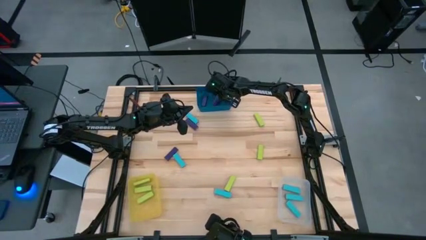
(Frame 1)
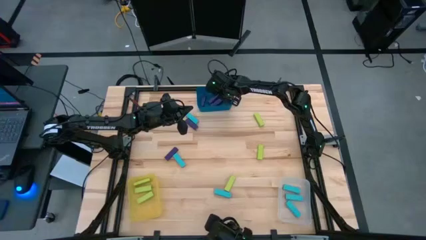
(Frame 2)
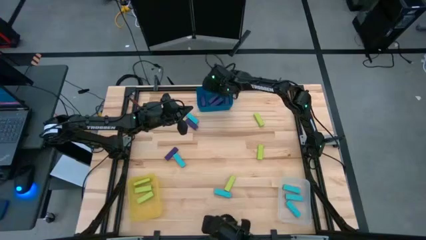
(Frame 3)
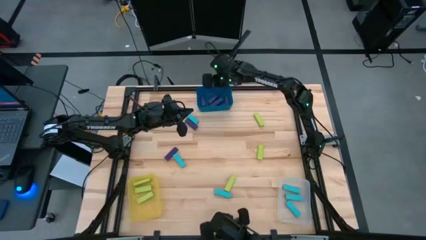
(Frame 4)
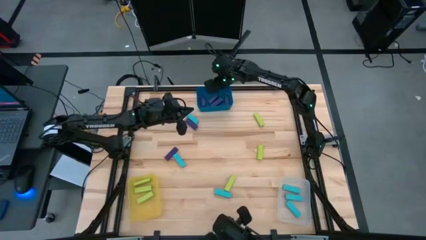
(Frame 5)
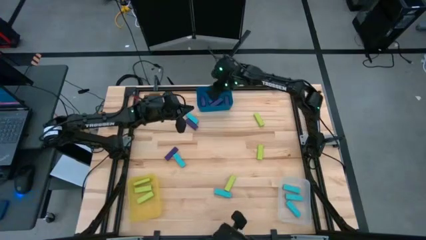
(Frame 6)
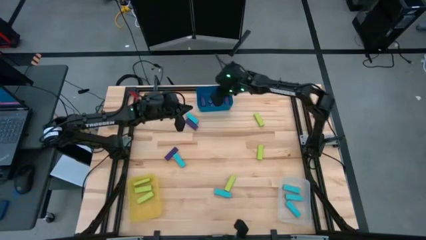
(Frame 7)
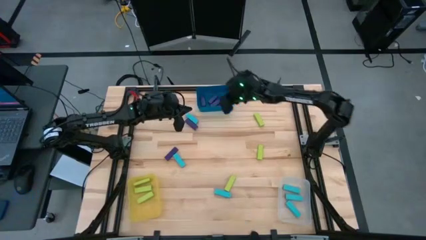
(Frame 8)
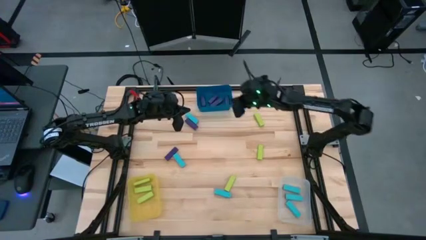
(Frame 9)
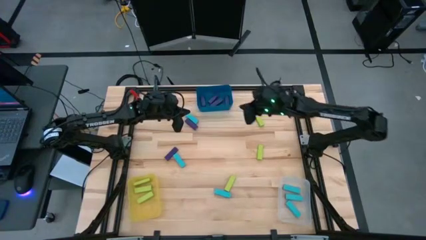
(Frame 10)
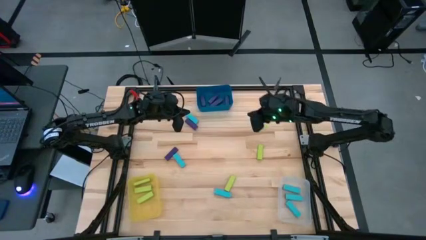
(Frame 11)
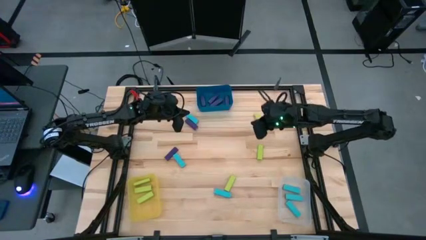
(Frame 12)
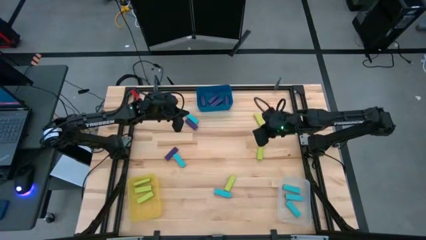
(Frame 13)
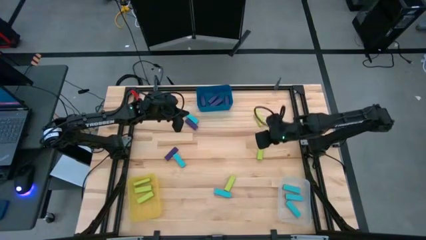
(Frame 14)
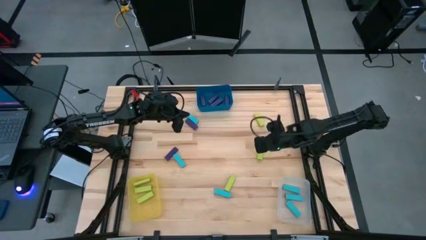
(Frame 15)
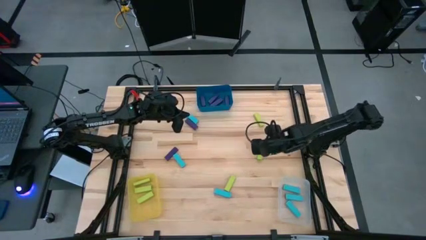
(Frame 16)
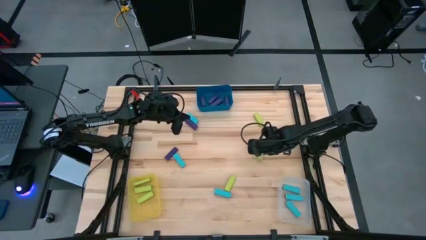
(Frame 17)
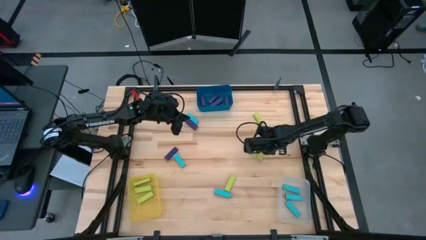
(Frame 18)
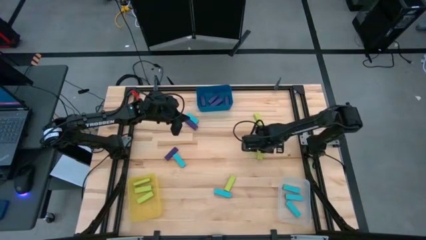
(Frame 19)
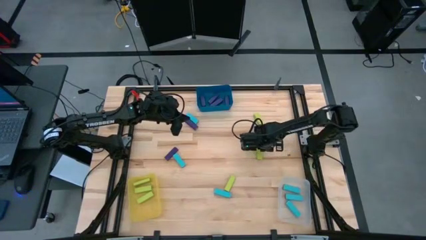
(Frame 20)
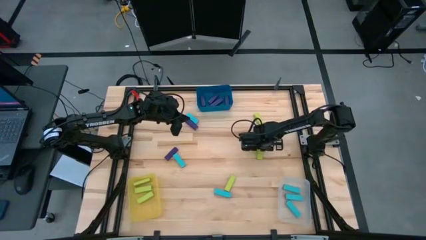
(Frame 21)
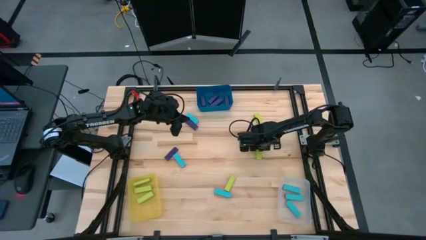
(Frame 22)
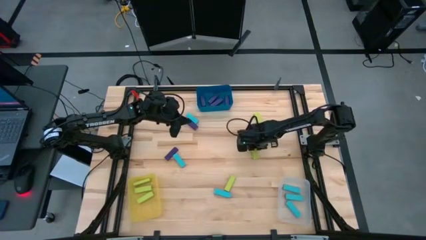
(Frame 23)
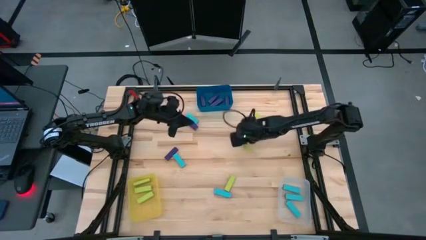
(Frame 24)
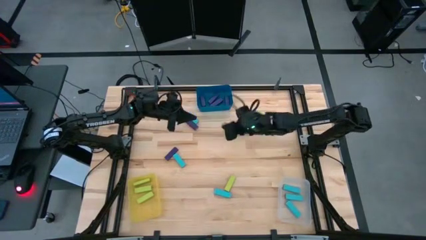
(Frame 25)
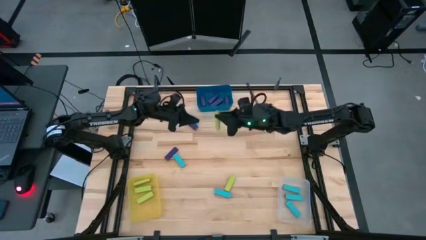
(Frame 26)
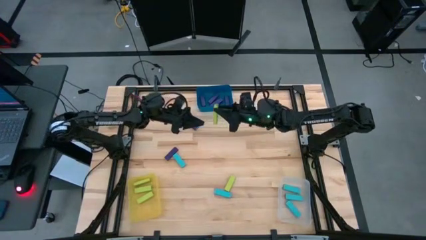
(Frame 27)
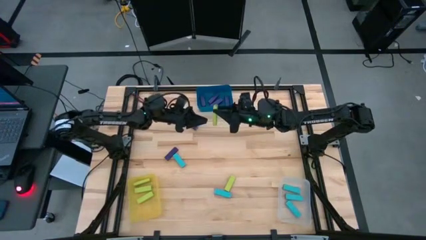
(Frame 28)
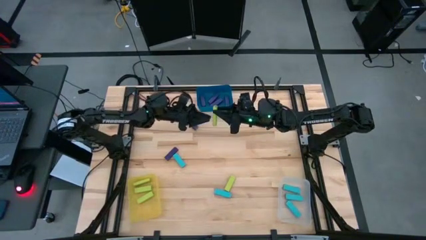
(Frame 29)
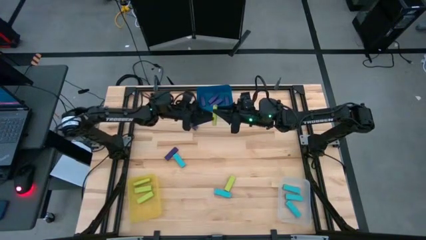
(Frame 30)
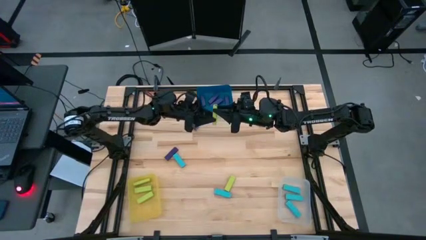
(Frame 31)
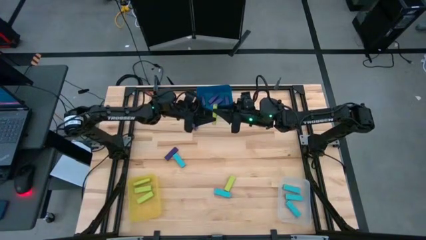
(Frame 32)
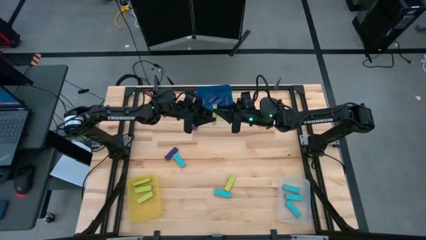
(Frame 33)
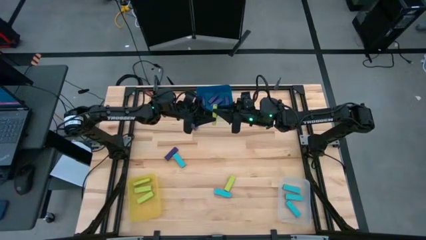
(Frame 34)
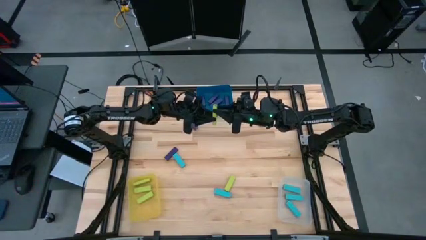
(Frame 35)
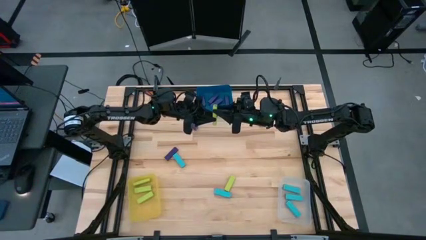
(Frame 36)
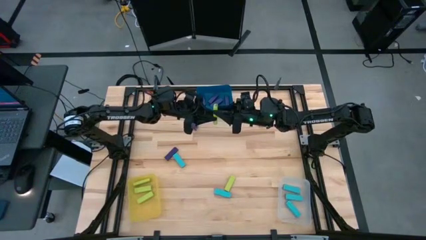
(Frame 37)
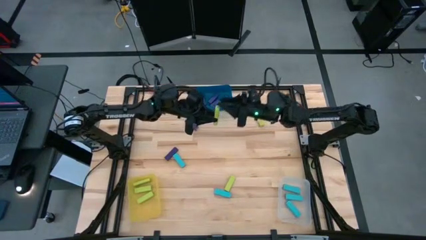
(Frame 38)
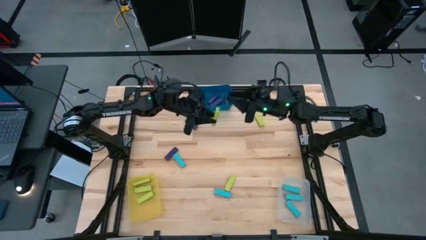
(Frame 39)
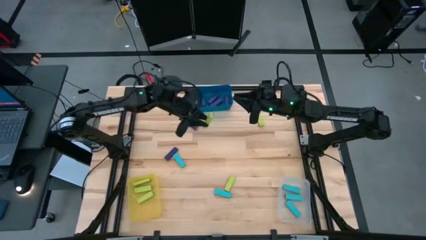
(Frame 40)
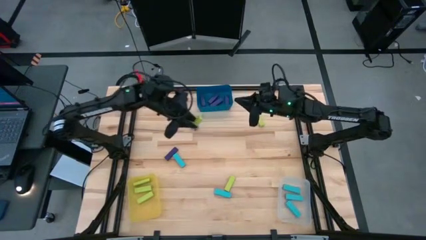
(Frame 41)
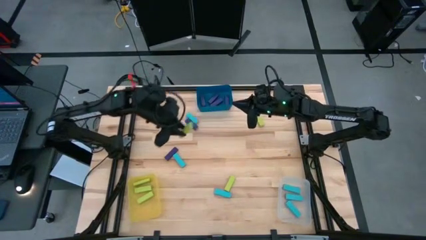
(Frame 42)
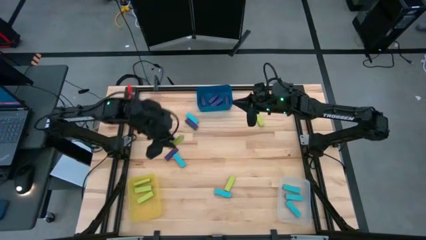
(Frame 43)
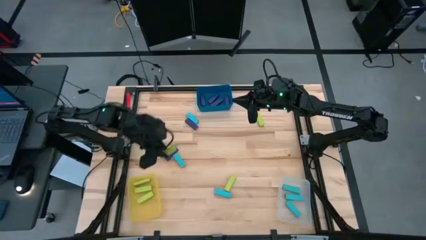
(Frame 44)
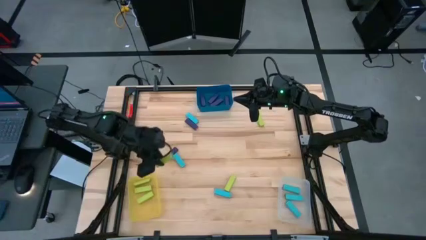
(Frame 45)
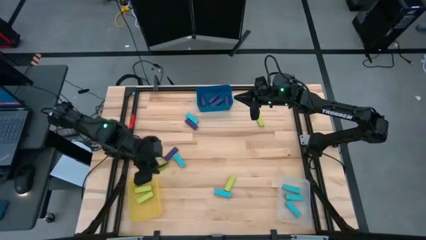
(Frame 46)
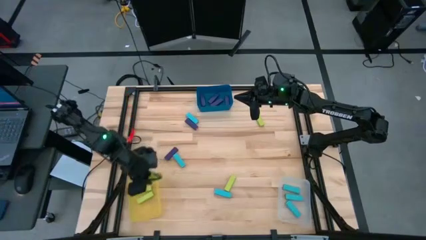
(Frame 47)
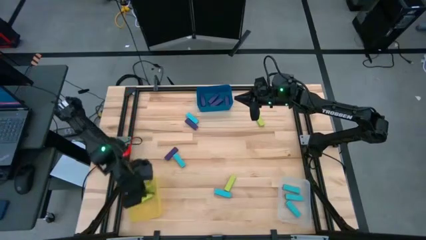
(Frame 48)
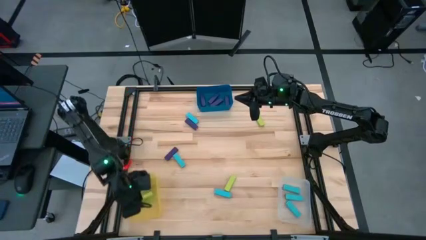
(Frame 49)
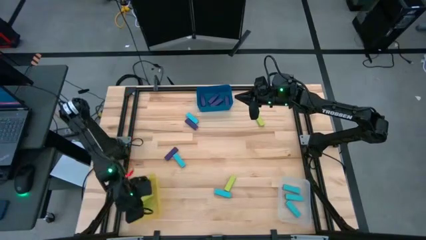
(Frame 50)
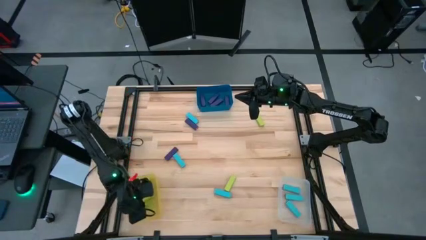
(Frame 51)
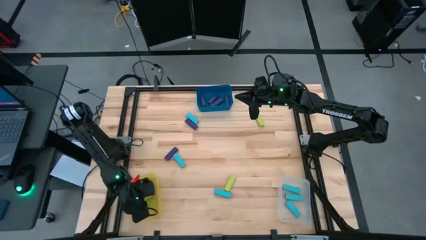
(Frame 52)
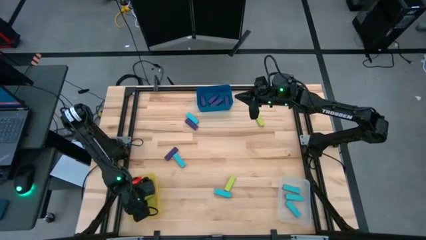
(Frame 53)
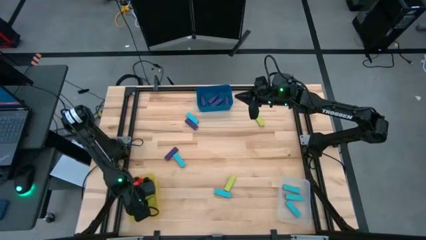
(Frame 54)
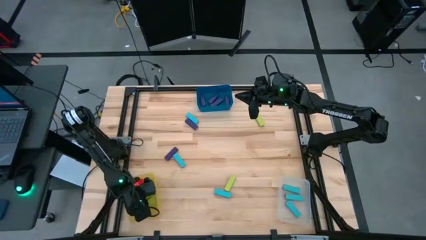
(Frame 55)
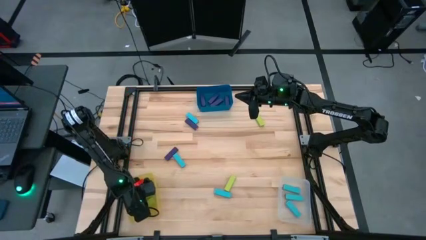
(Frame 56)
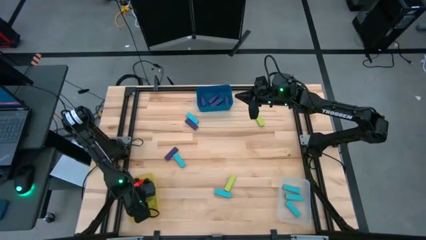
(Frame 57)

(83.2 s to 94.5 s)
Task: Sort blocks
Put the yellow green block into the yellow bin

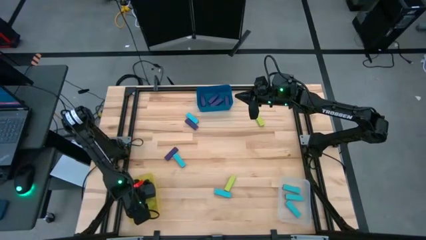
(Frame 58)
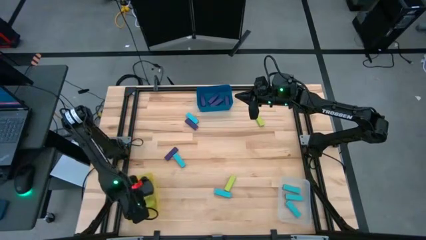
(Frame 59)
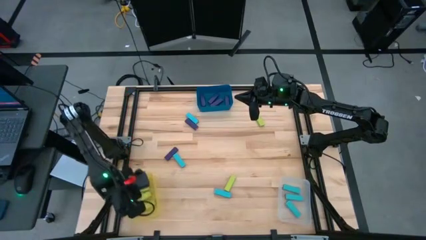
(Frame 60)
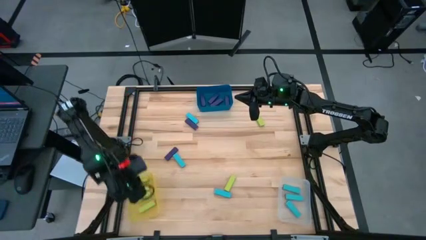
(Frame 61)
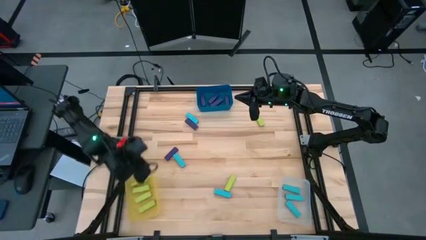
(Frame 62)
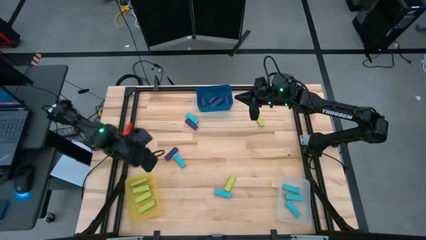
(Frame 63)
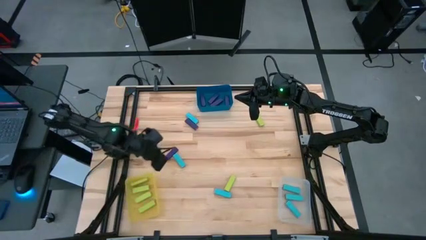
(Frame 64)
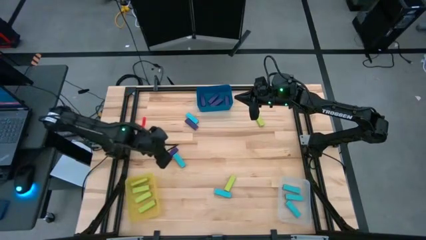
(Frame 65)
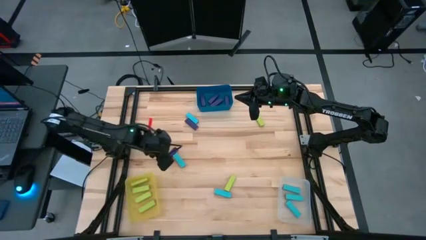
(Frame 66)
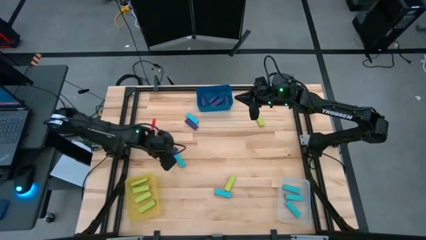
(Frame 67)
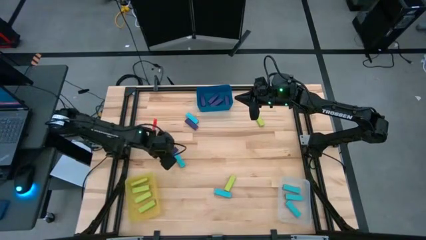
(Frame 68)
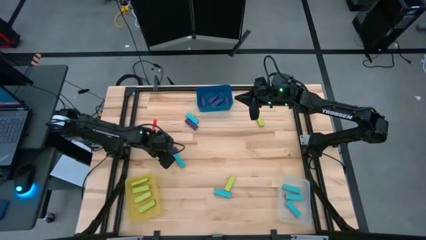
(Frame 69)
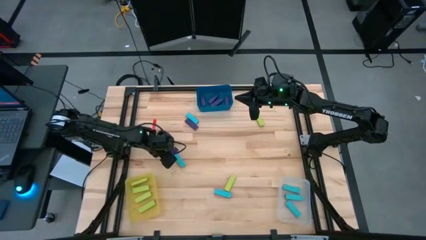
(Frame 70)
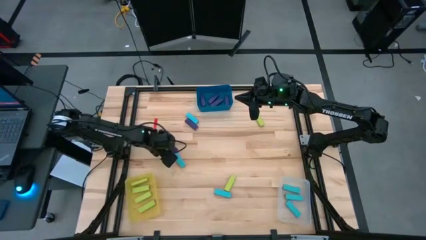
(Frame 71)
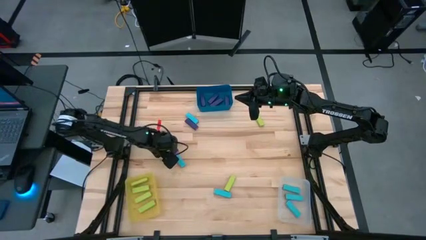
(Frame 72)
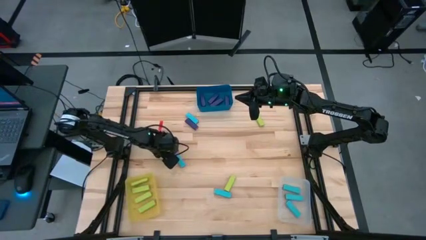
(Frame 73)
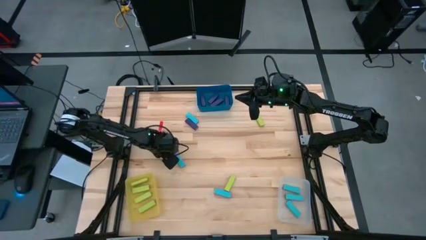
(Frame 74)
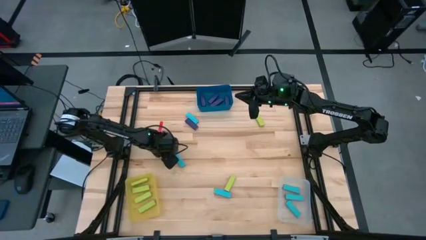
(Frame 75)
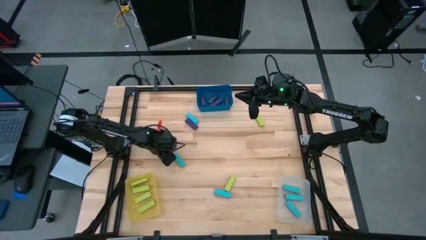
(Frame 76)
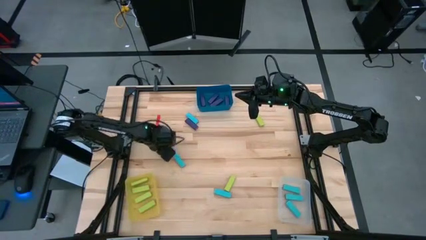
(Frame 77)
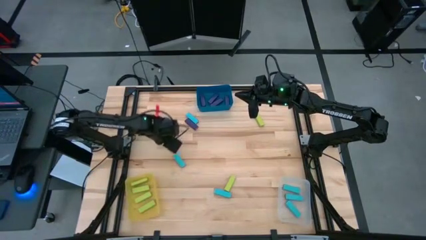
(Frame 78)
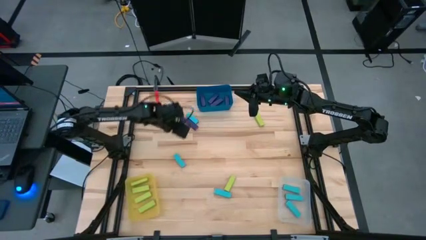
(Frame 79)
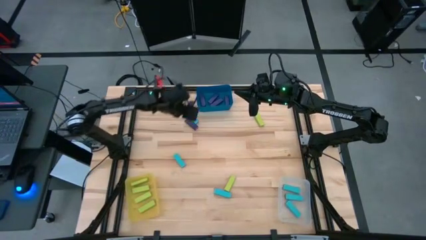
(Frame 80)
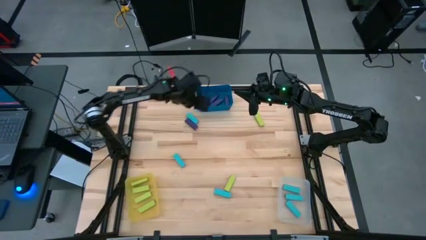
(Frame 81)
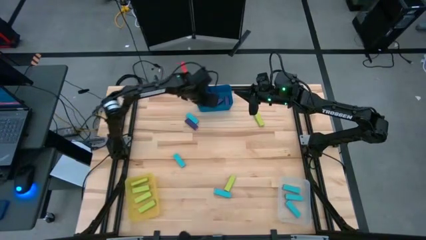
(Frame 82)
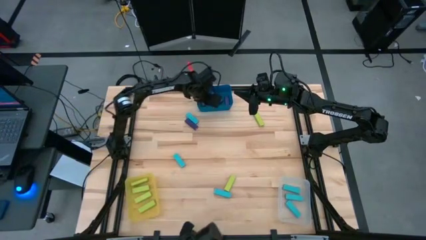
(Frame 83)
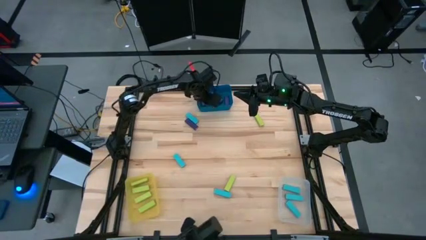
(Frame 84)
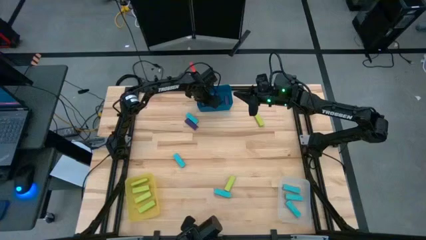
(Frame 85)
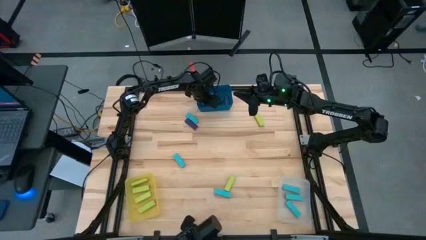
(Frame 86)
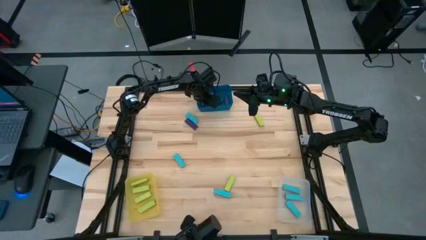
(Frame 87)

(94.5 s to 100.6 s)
Put the purple block into the blue bin
